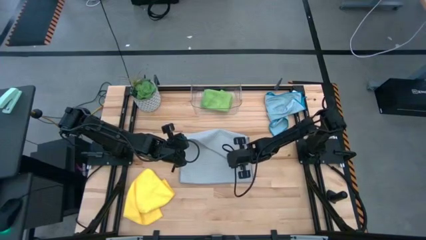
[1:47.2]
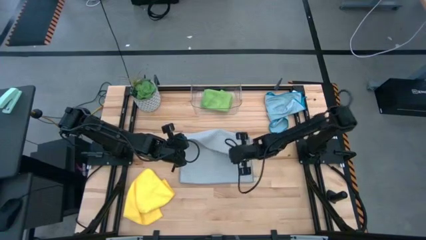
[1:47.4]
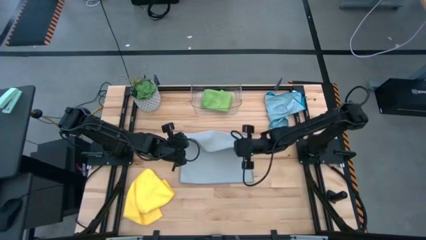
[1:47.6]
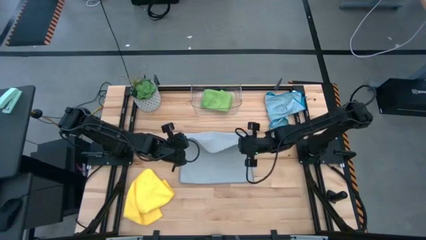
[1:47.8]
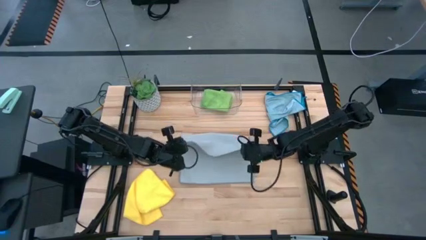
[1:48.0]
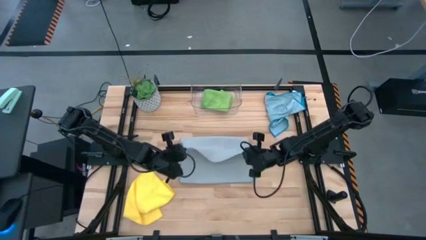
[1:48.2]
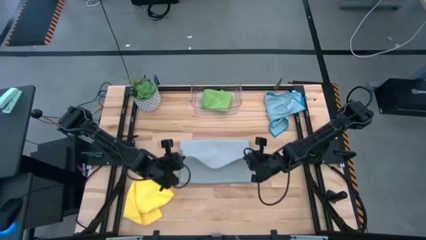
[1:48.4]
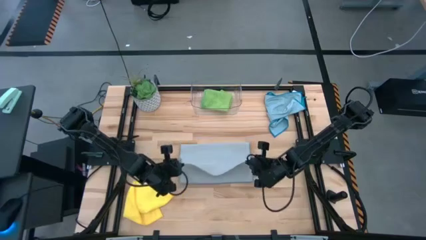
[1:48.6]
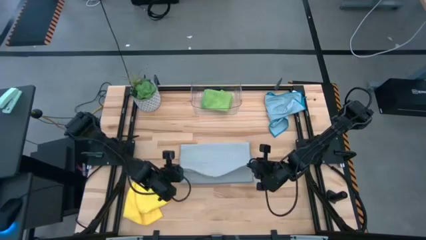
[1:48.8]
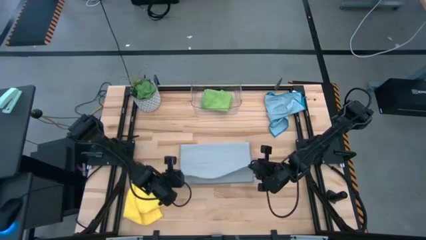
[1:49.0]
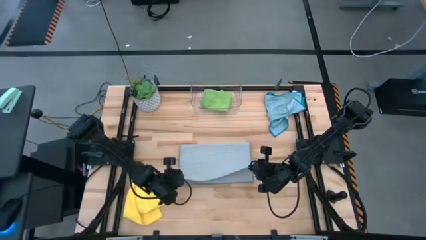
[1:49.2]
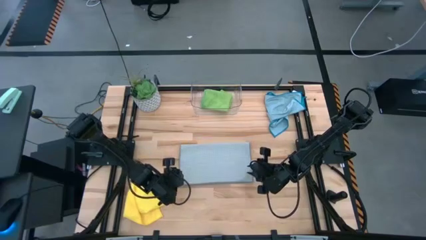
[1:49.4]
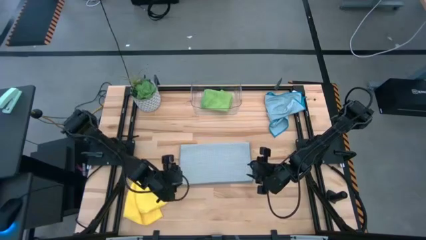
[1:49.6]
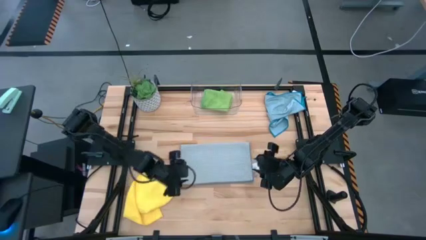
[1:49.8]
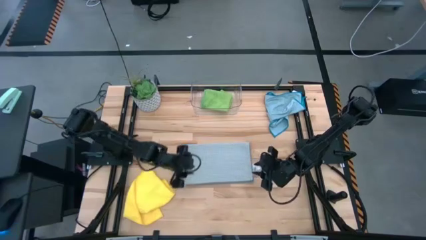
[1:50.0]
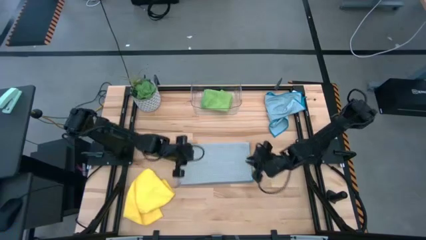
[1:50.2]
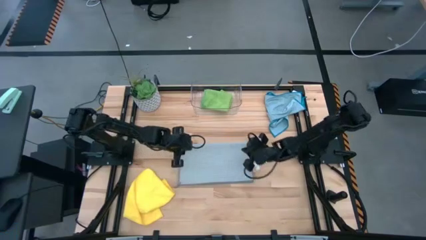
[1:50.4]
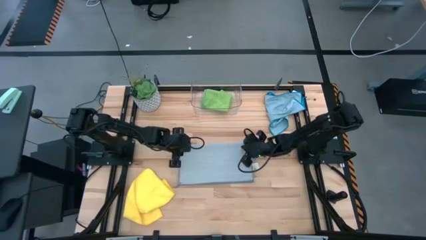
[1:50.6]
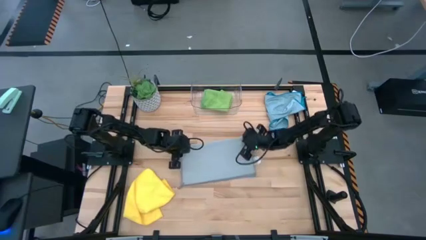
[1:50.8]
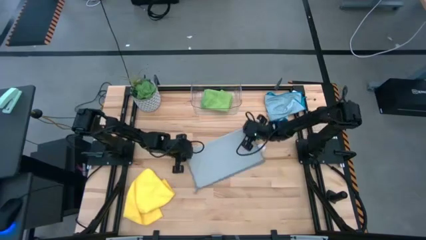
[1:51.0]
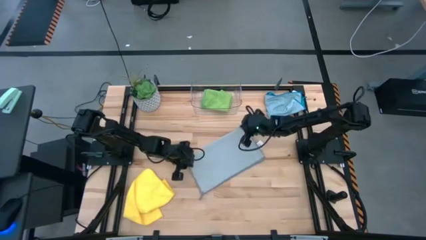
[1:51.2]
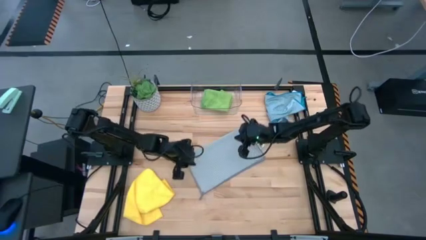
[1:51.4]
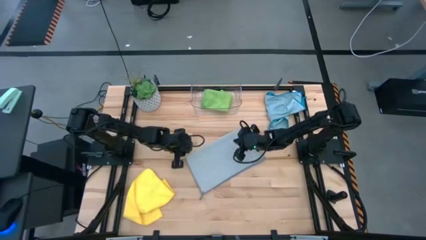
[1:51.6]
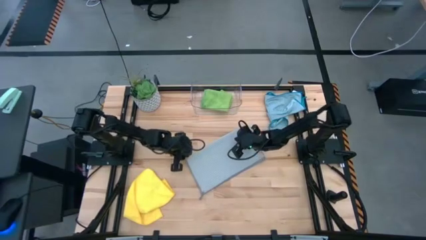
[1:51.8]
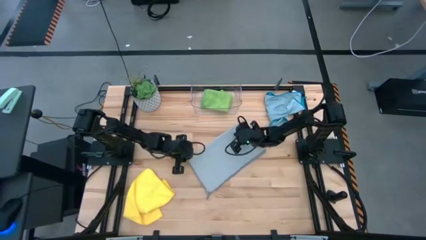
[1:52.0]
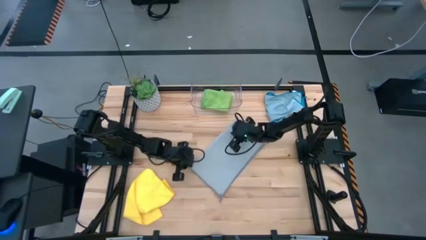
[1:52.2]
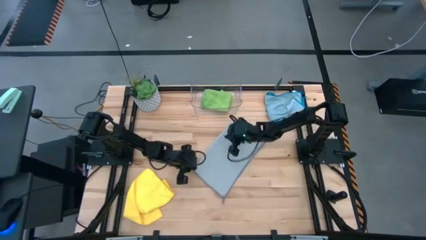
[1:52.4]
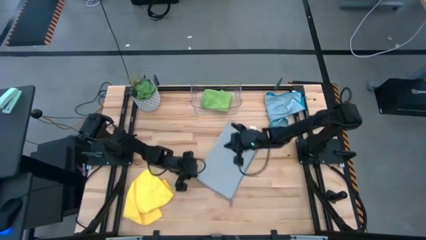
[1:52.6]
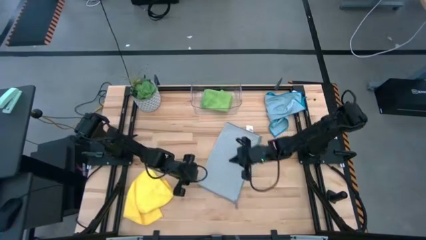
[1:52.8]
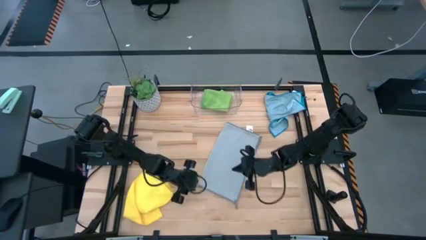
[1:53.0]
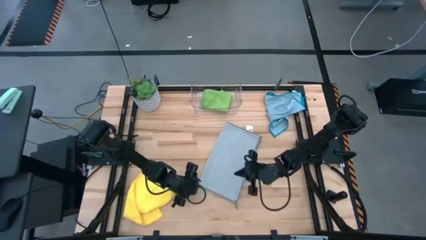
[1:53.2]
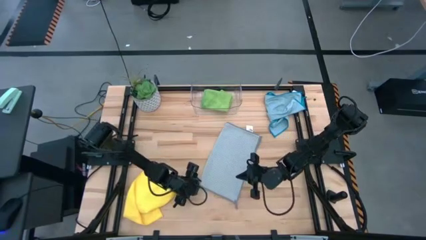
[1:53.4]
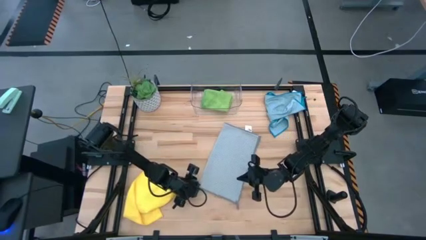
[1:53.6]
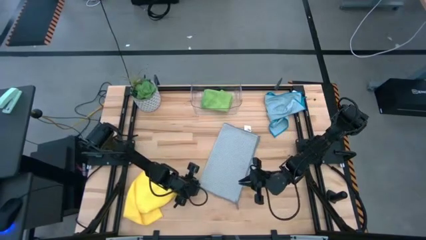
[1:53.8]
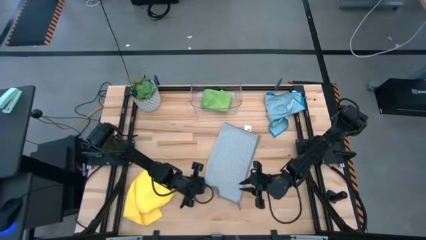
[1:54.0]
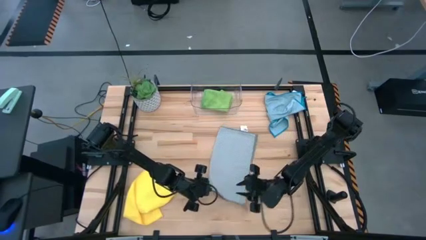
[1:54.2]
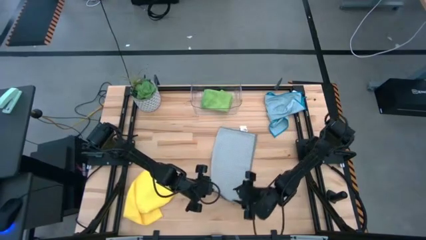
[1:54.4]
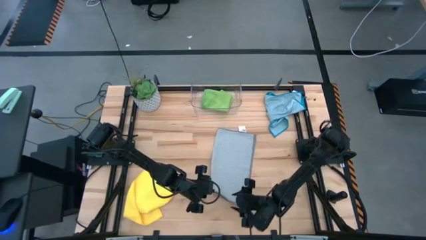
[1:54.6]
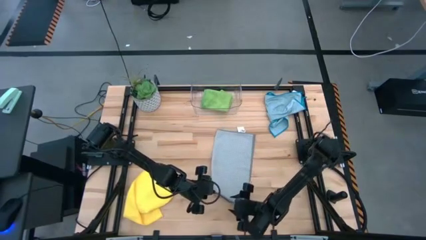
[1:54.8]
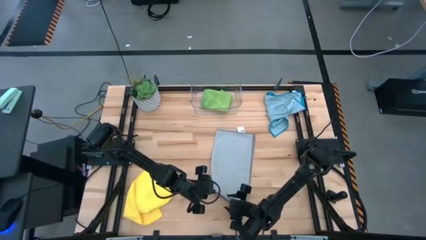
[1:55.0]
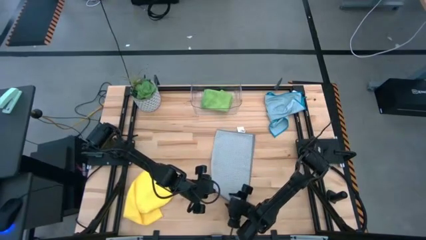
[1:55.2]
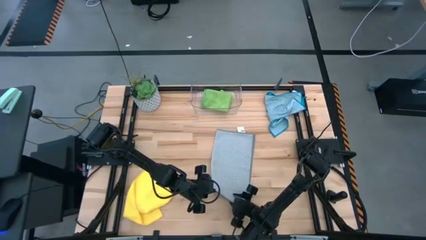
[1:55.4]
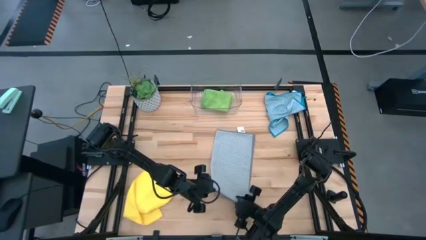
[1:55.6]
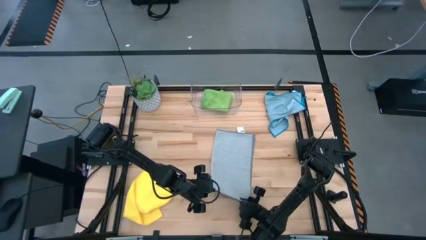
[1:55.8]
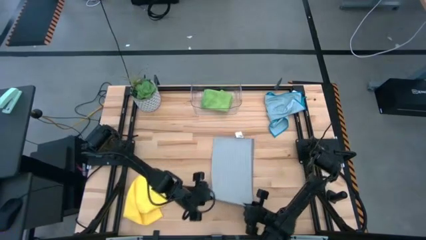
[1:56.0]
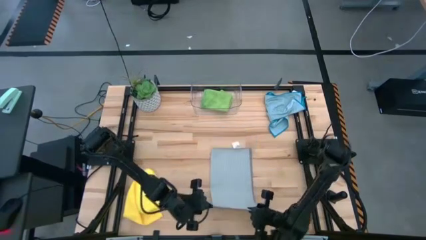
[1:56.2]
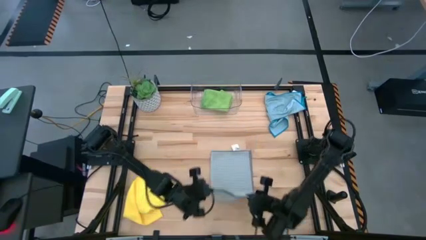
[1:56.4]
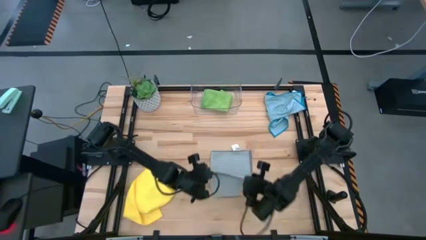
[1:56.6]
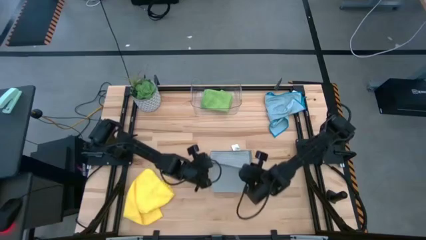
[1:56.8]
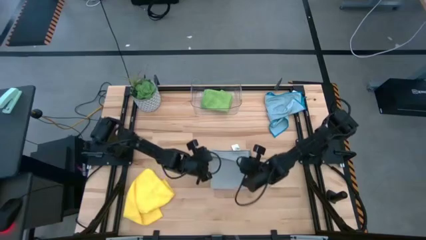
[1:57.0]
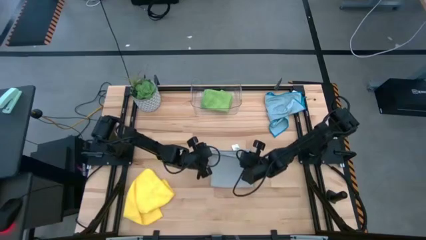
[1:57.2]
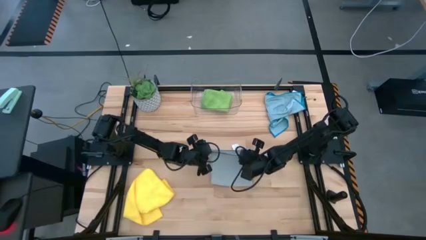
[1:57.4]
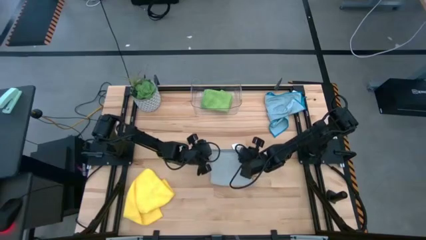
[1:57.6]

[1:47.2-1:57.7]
Task: Fold microfiber towels
Fold the gray microfiber cloth

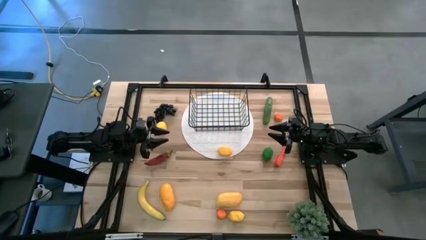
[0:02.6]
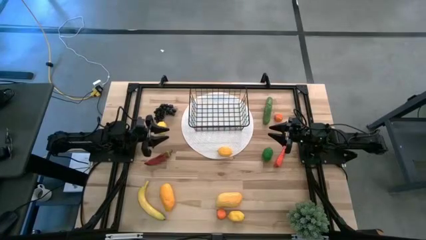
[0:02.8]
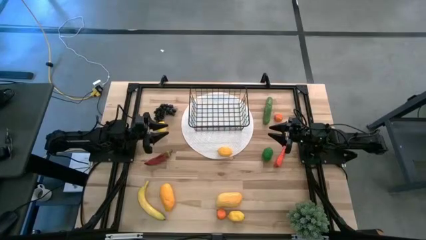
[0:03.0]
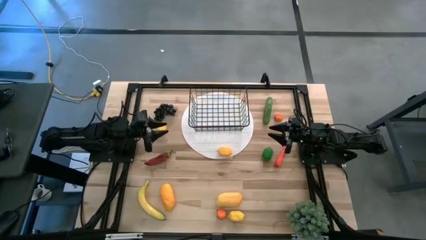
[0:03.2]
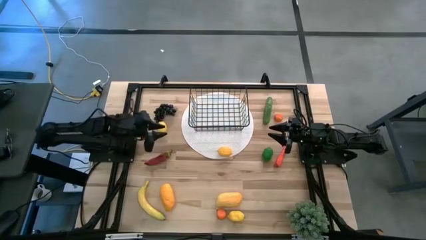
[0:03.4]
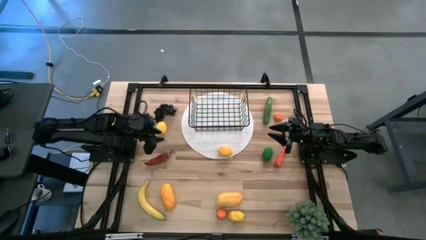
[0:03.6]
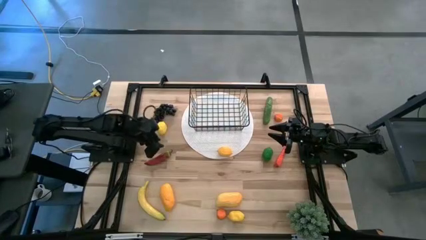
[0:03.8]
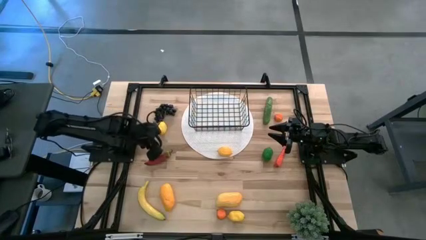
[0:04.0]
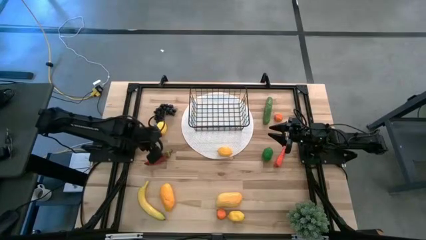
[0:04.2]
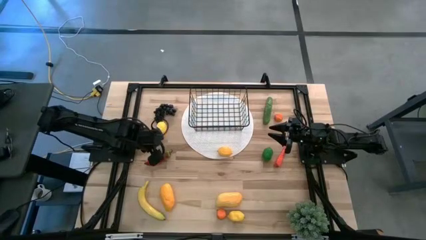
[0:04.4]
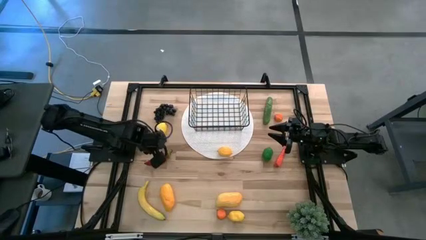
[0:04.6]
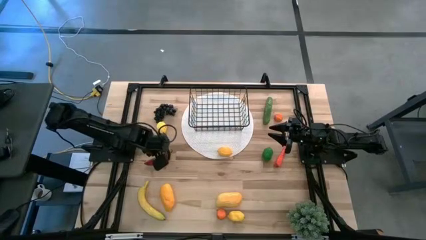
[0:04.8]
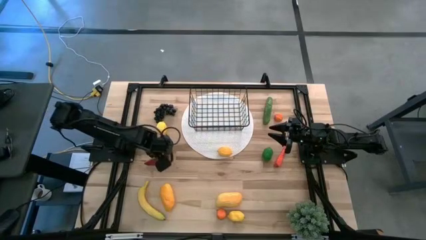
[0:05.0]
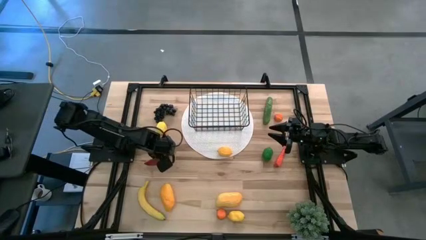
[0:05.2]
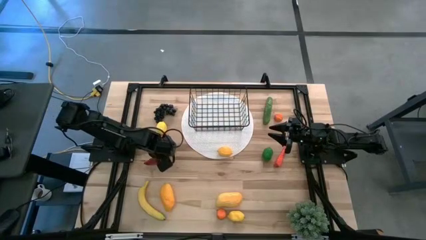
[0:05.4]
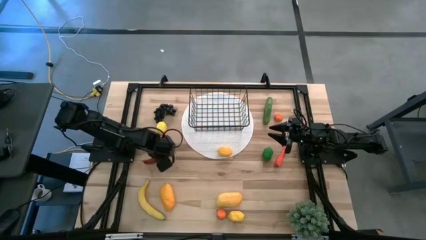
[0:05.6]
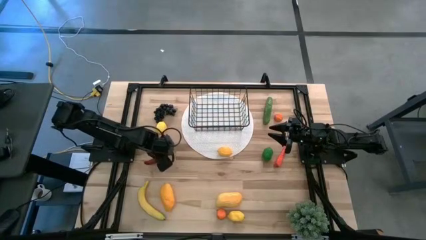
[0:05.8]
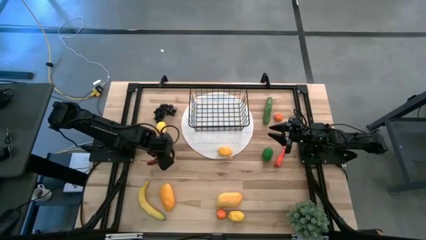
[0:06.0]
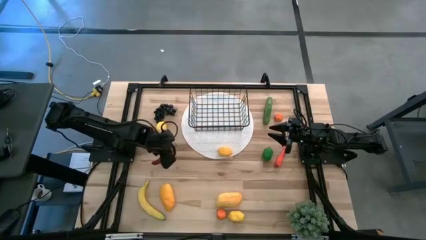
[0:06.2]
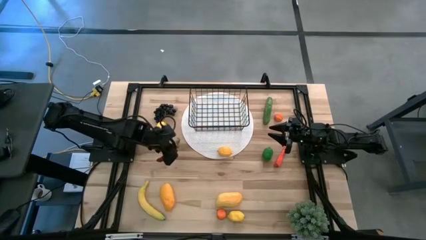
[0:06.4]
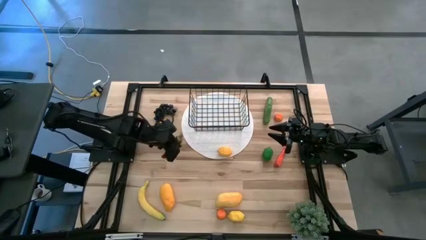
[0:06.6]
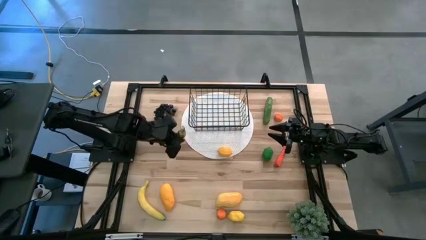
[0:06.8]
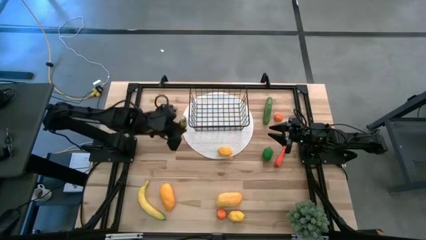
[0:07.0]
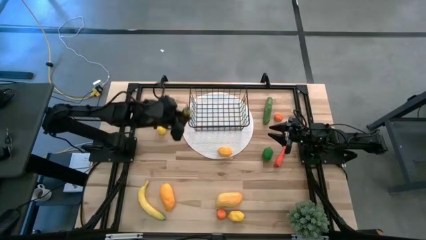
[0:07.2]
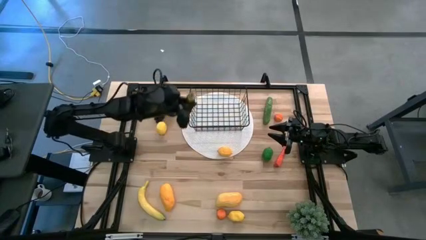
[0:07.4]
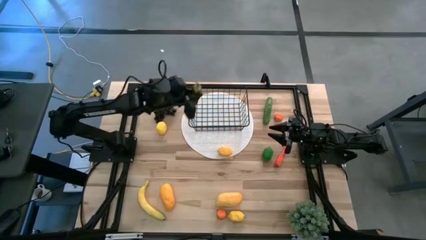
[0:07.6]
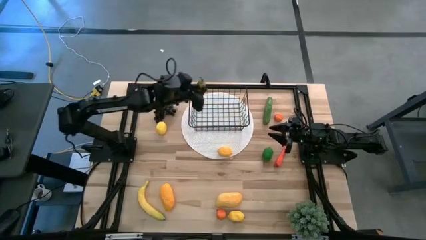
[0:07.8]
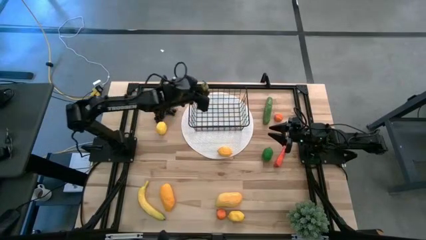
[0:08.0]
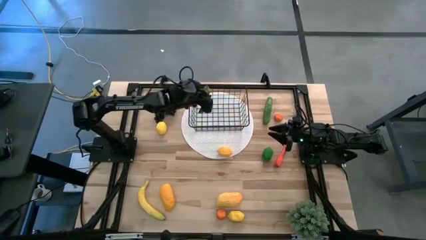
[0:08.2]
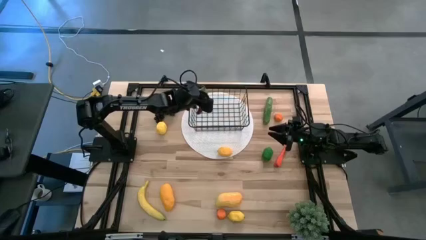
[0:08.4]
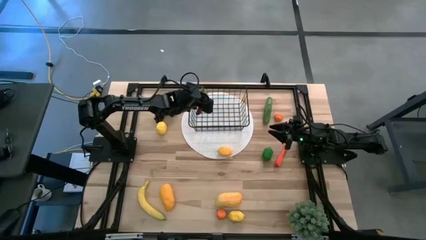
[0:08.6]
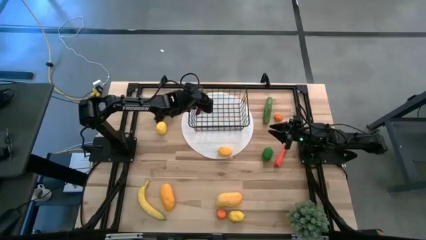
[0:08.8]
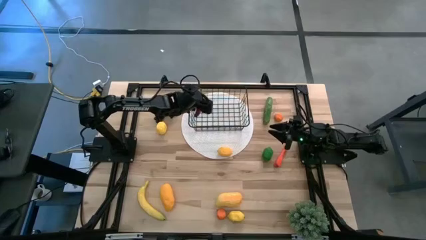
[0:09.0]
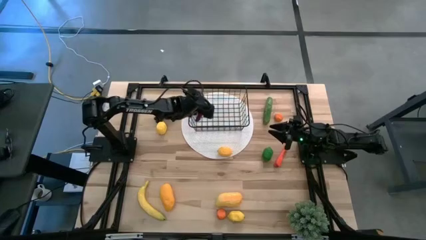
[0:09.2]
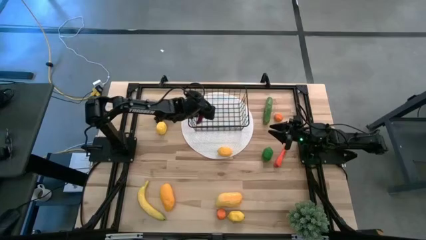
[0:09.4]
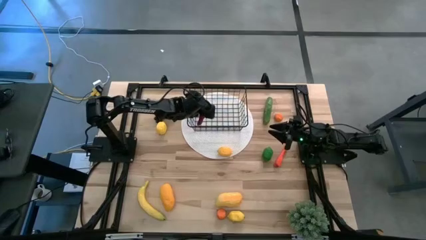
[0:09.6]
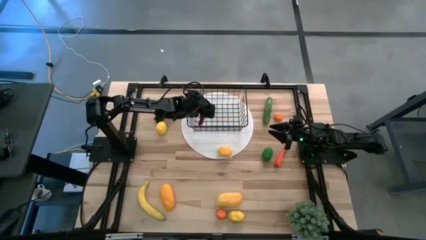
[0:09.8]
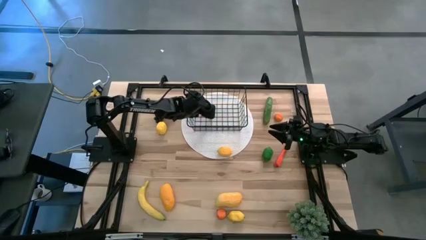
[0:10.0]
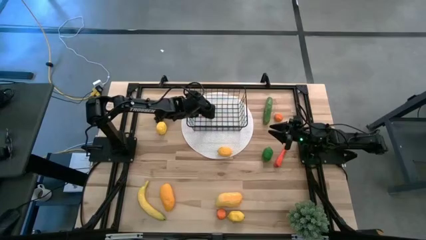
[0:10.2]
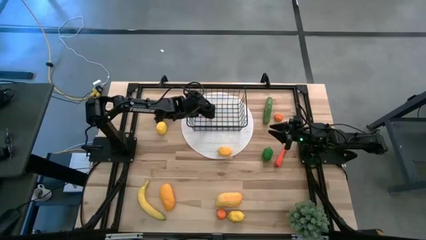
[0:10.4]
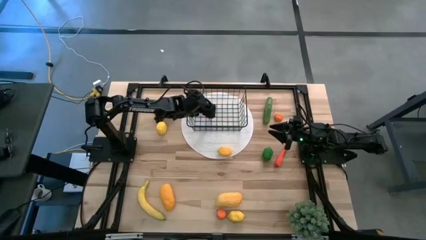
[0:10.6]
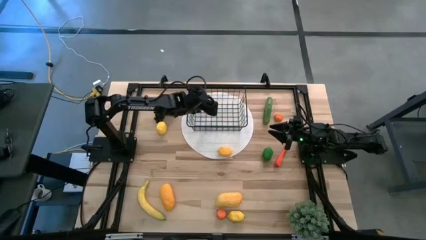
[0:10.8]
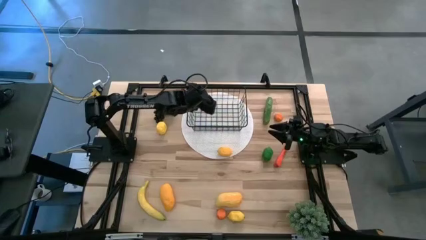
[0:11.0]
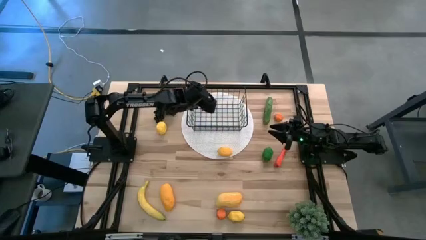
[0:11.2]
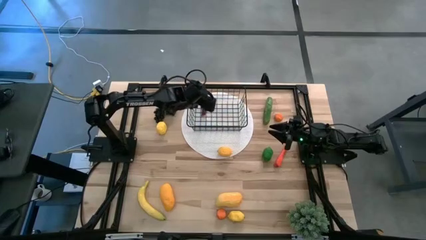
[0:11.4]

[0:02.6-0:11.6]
Task: Build produce basket
Put the red pepper into the black wire basket
